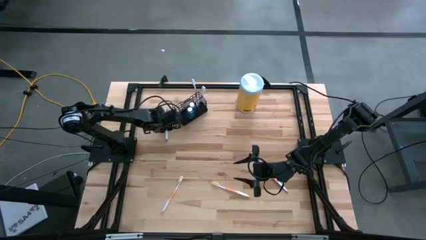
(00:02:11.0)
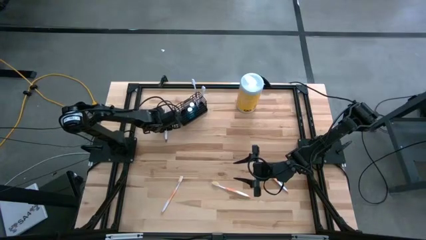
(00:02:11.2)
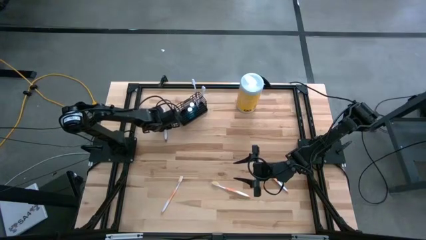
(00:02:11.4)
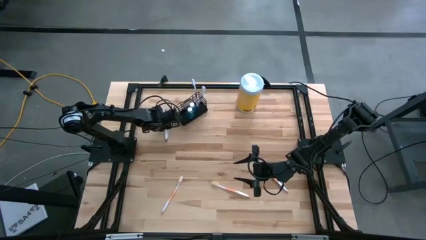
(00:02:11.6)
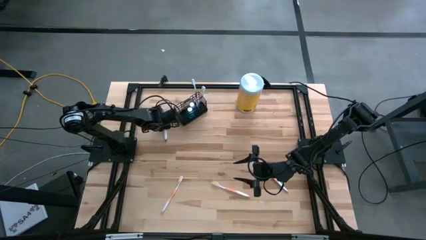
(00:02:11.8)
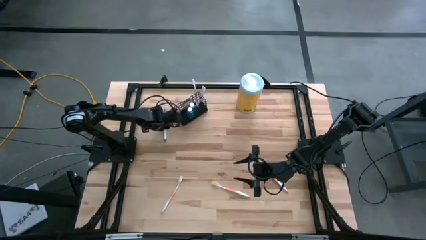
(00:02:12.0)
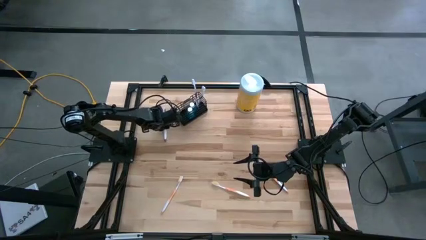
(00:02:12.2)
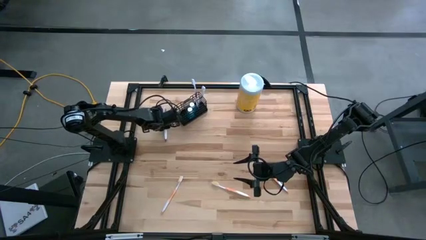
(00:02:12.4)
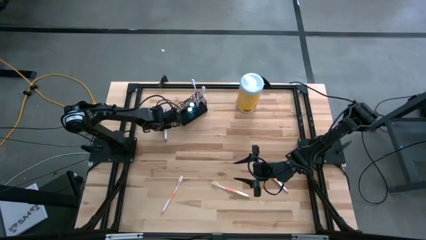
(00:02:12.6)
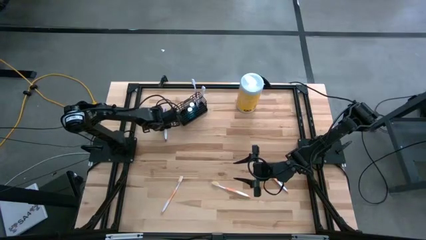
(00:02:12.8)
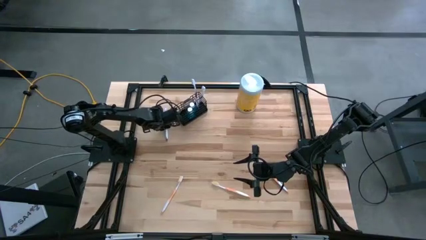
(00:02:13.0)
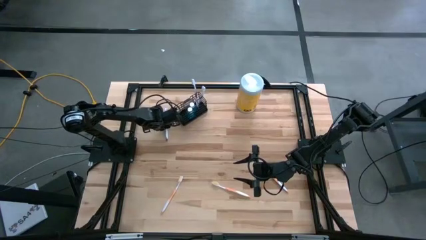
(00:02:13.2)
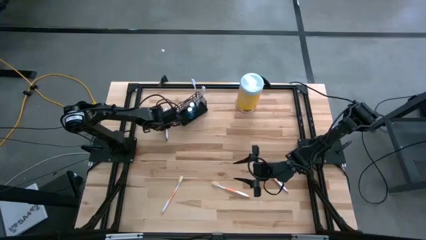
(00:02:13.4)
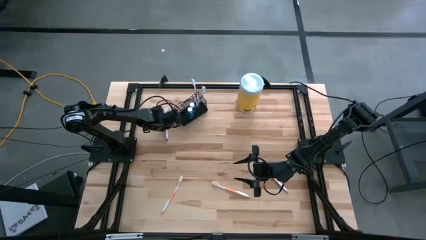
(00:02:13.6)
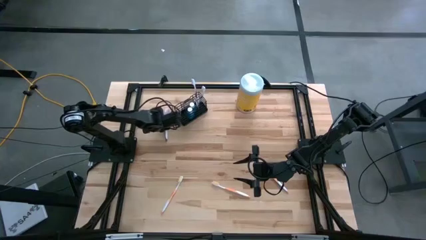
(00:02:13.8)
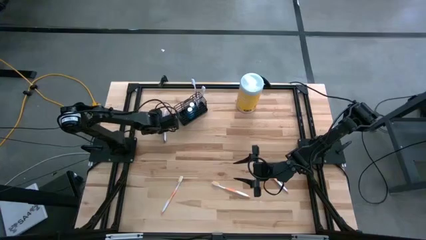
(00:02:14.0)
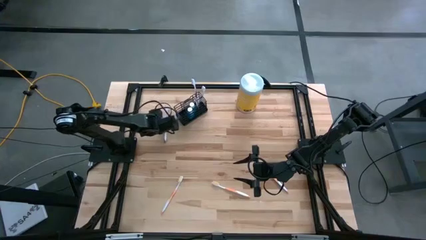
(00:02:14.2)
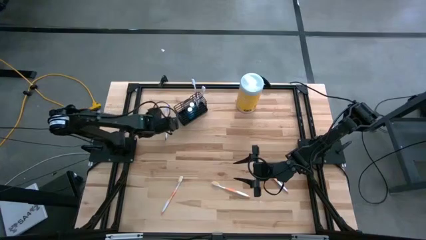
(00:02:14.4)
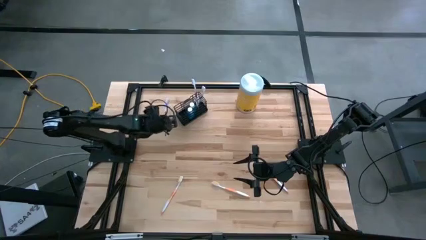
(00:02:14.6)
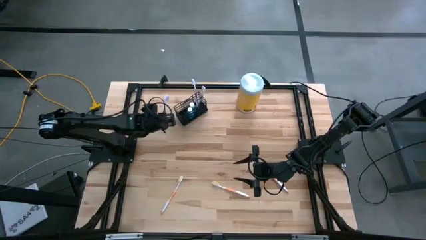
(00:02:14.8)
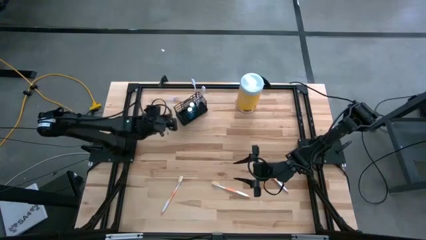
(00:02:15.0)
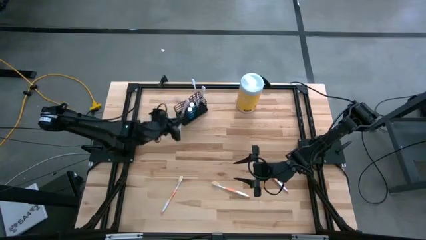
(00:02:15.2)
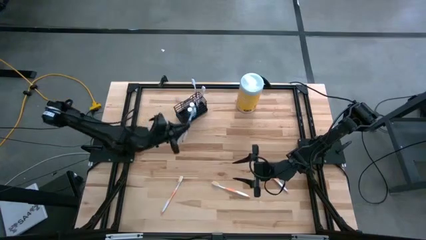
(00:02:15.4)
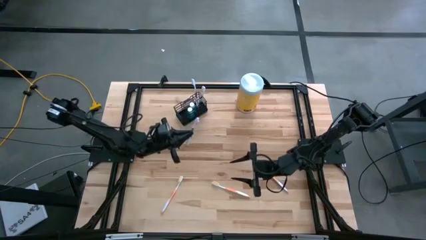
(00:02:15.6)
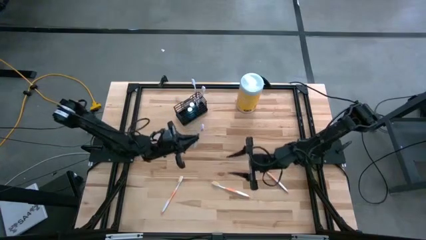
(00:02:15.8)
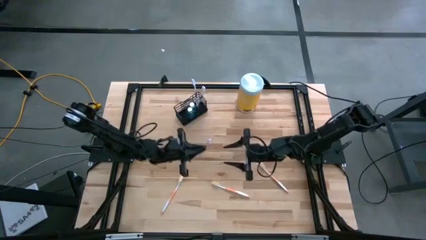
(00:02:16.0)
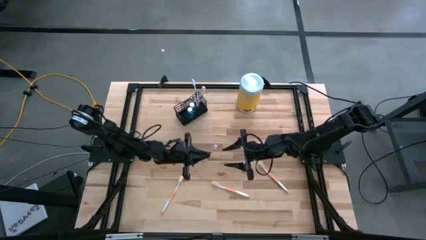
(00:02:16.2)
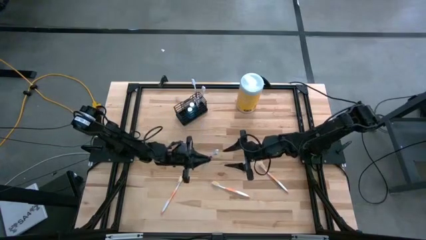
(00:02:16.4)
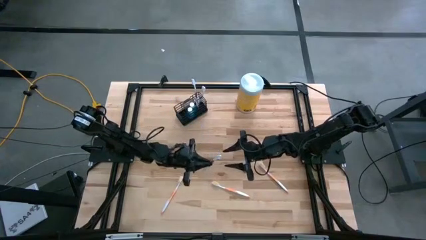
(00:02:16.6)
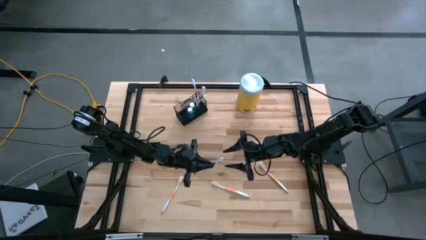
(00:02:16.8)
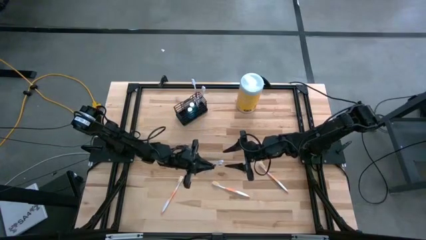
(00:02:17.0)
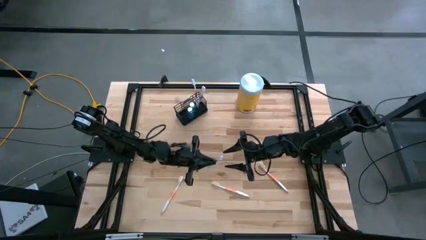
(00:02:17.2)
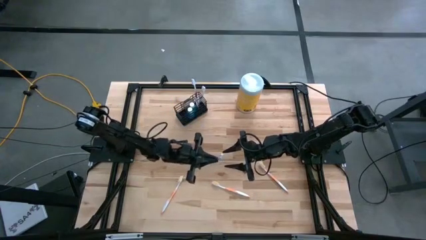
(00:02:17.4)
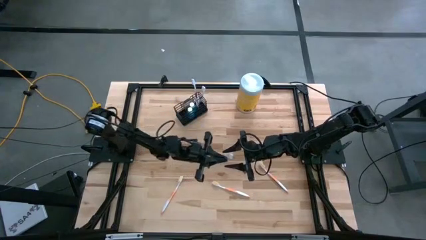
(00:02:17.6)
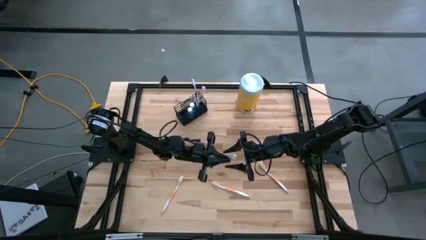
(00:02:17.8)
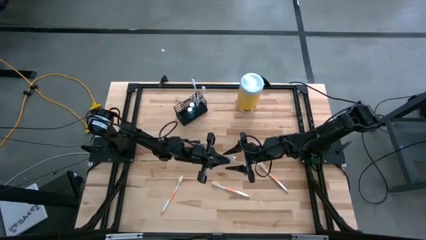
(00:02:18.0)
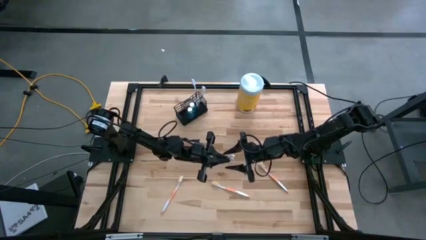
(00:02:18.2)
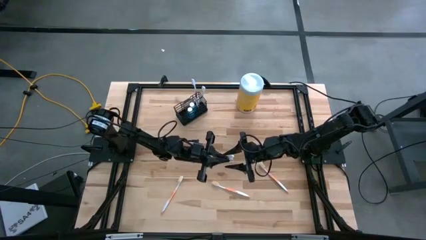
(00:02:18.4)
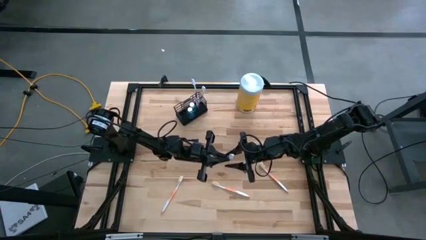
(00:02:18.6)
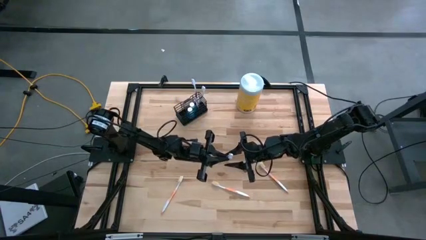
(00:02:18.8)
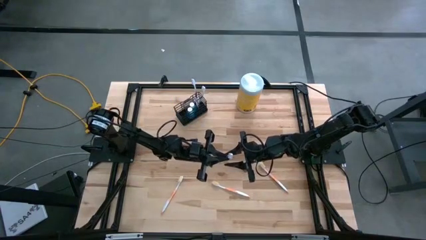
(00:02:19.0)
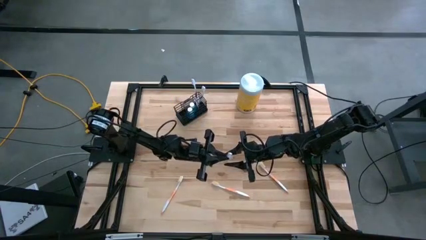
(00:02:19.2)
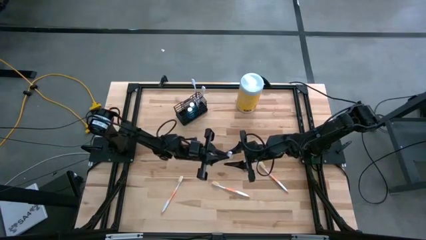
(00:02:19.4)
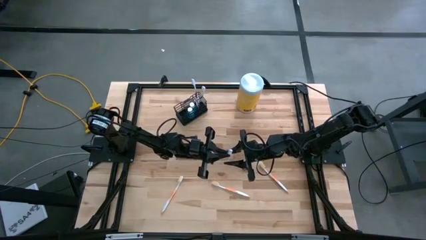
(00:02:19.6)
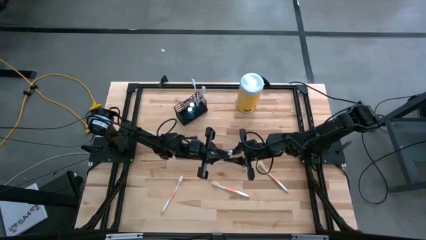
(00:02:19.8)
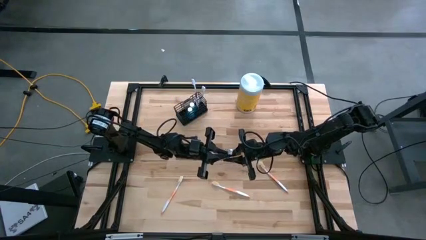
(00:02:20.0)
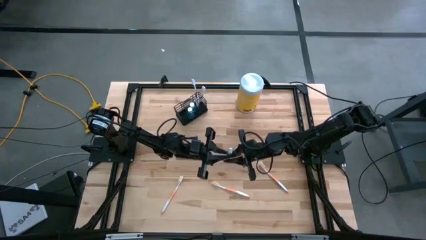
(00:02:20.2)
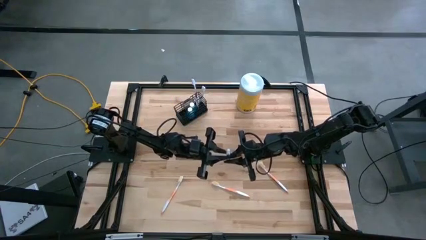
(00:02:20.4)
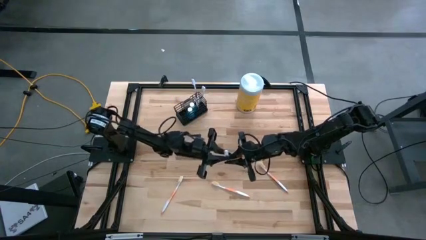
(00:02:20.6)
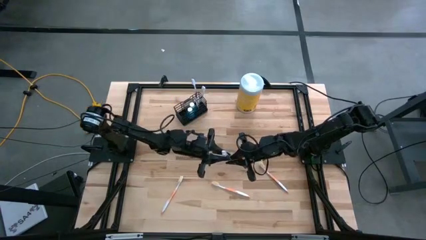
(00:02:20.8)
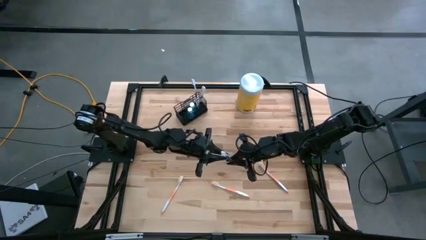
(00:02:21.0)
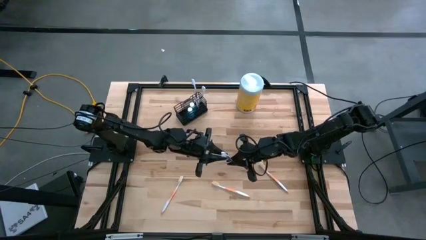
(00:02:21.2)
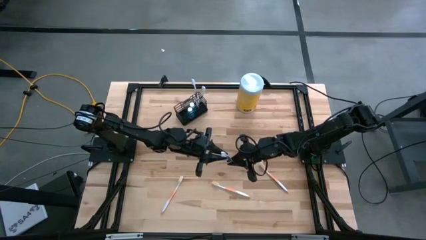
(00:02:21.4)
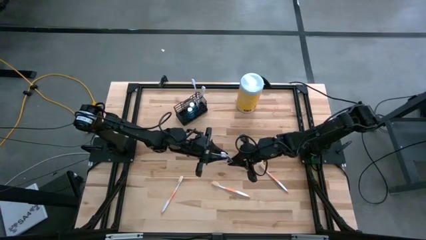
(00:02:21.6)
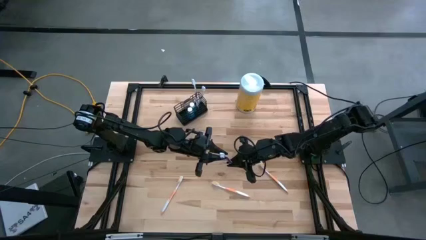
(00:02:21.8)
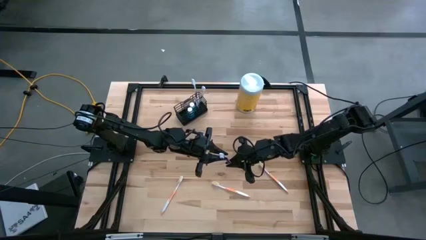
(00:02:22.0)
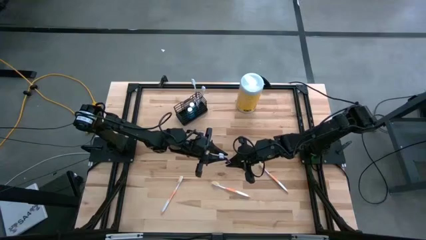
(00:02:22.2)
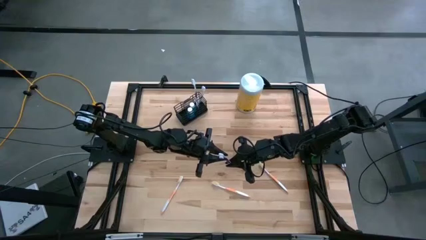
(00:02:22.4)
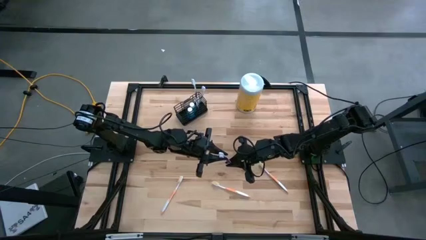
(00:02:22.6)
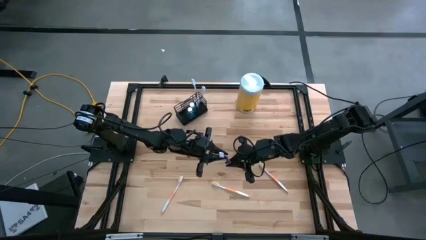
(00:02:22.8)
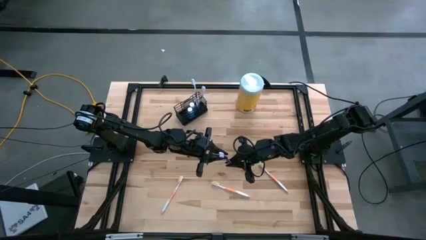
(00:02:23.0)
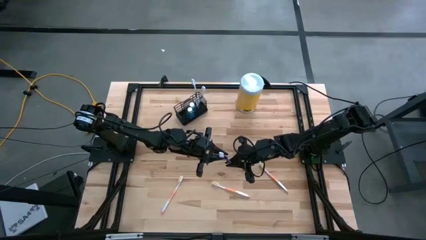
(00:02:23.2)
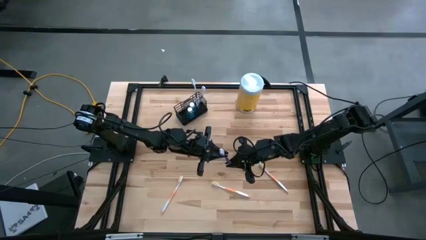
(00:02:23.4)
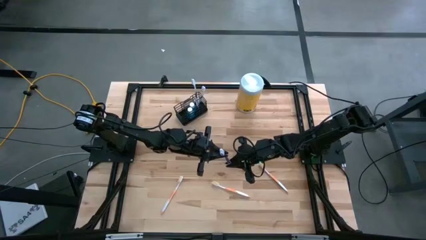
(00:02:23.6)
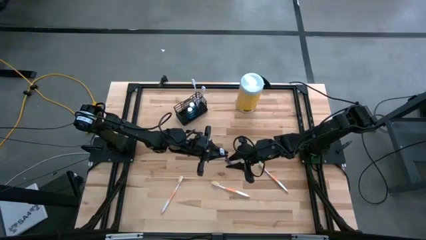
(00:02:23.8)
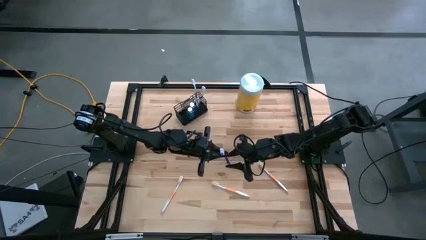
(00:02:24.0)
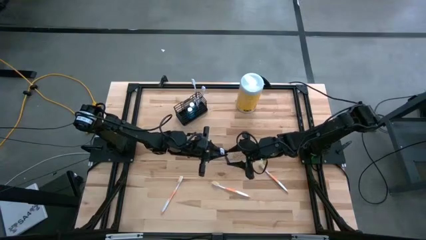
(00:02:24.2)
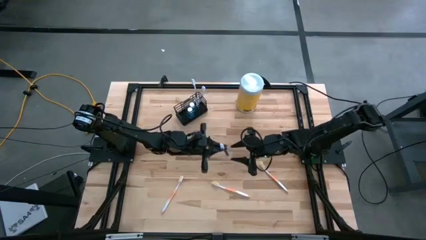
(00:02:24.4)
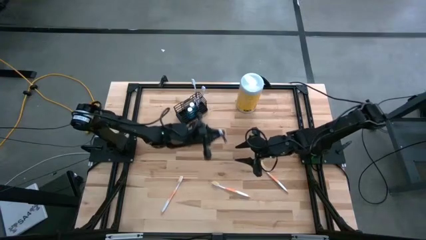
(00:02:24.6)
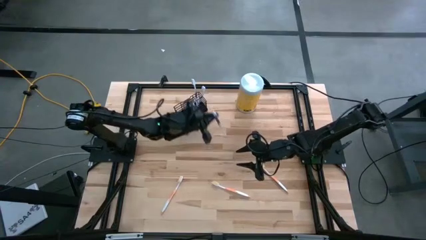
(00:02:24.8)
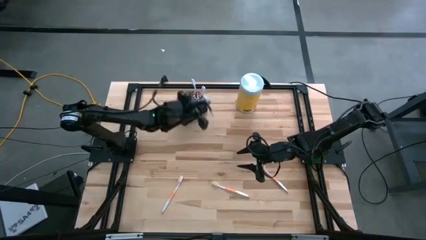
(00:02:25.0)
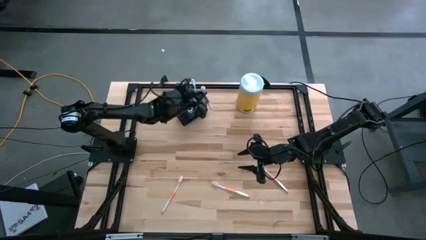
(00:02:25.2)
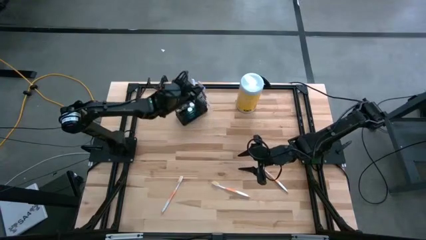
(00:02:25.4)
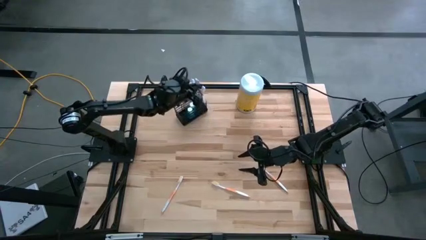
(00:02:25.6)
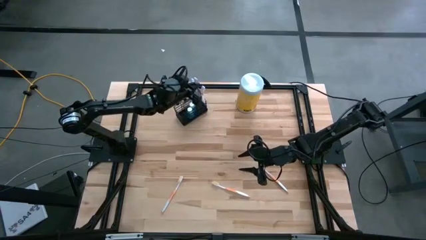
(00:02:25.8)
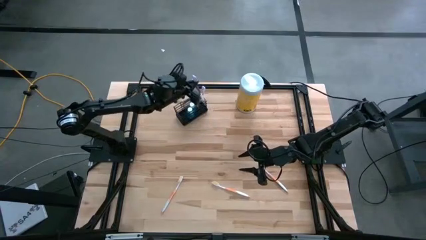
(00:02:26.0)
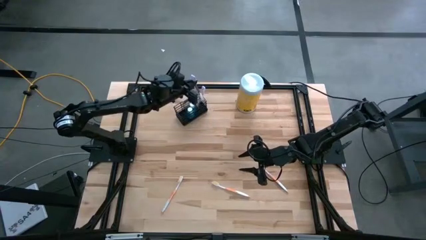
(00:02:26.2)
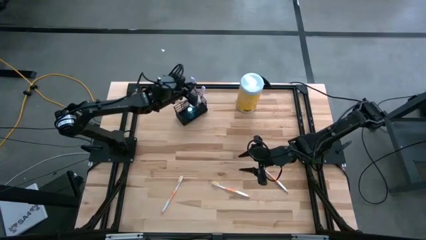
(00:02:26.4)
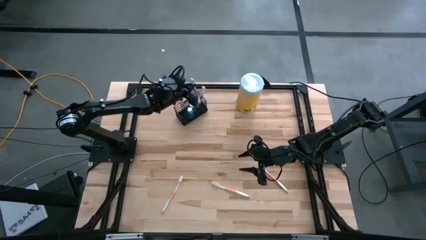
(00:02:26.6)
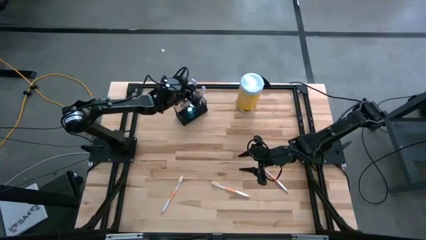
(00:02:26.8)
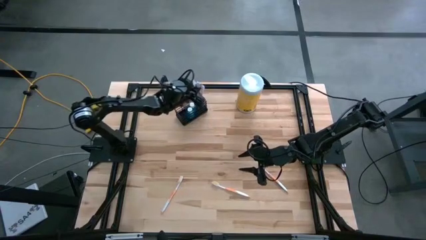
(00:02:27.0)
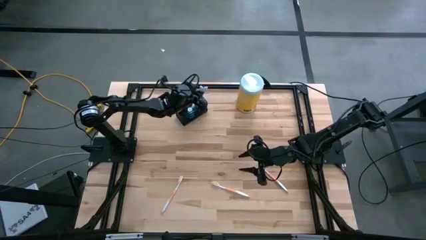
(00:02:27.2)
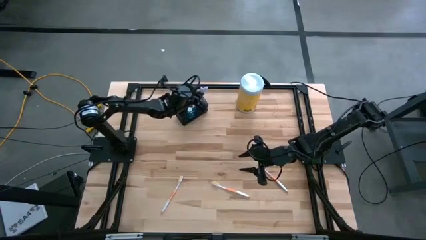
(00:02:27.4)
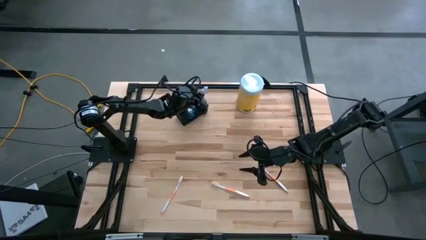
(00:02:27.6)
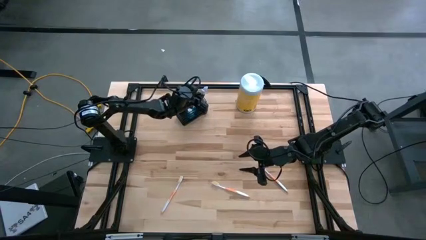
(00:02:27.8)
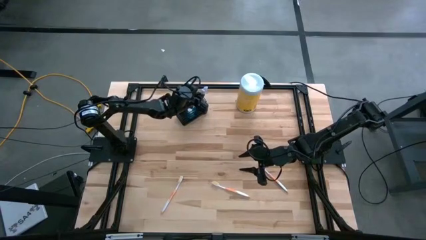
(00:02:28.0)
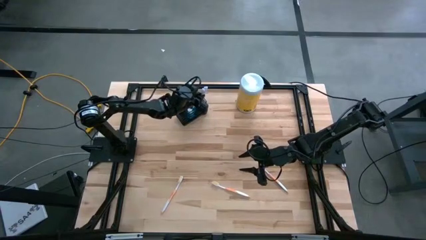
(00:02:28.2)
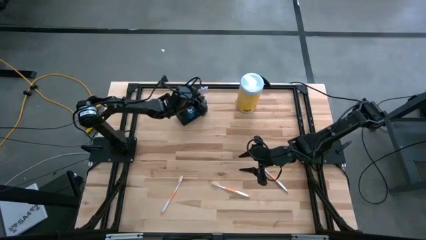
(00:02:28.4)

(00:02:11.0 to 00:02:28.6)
Task: Pick & Place toothbrushing station
Put the purple toothbrush into the right section of the wire organizer
